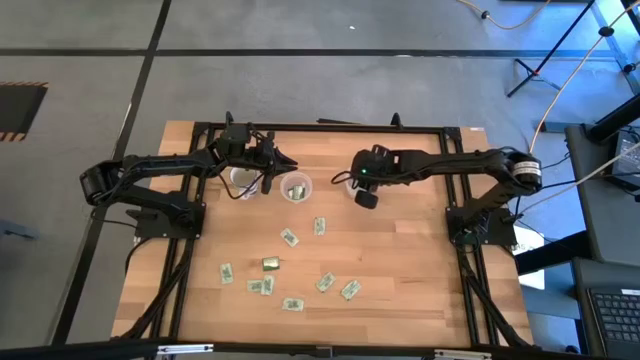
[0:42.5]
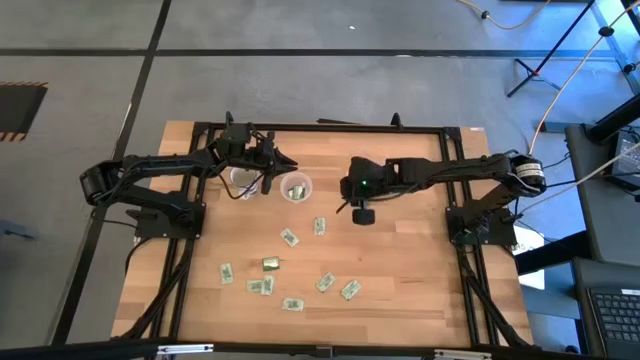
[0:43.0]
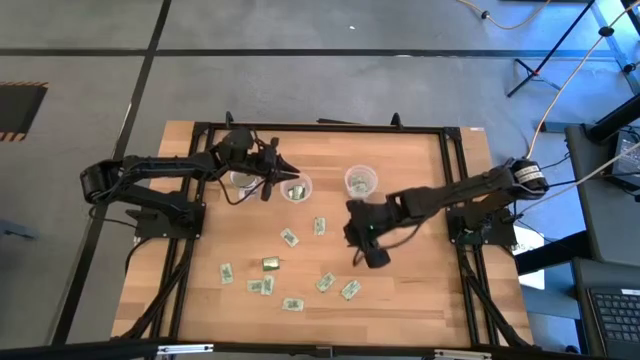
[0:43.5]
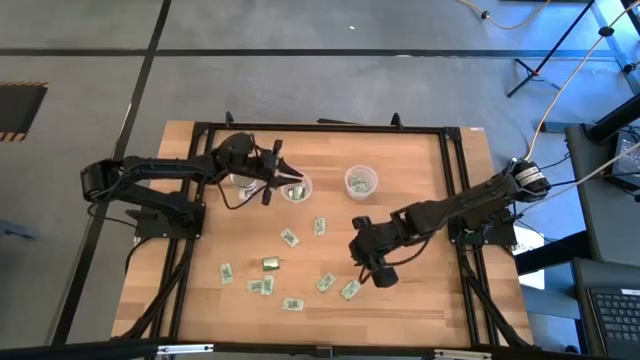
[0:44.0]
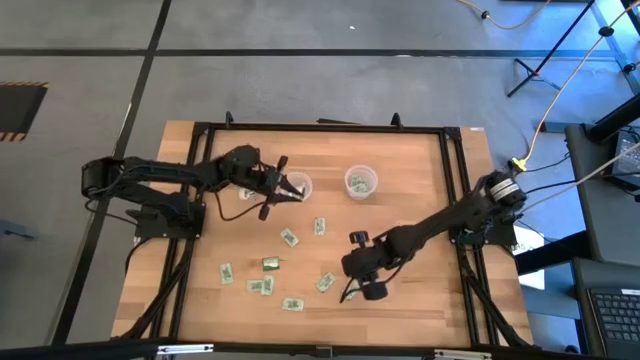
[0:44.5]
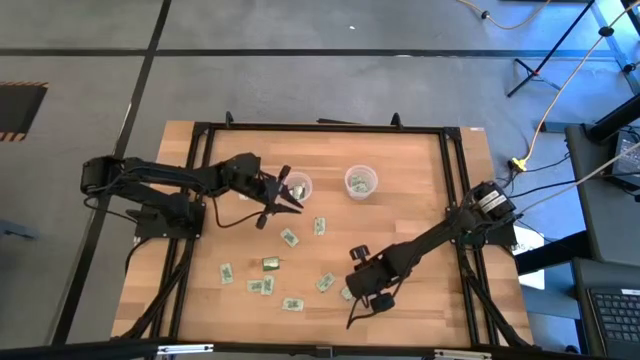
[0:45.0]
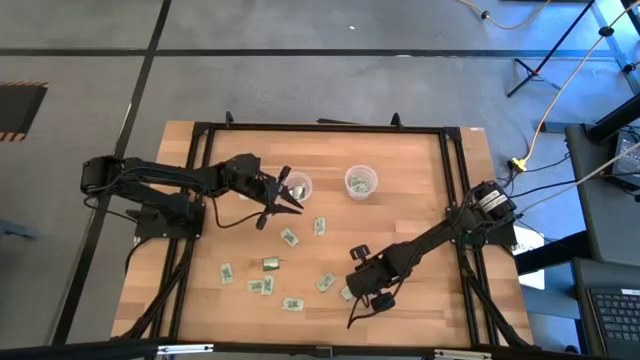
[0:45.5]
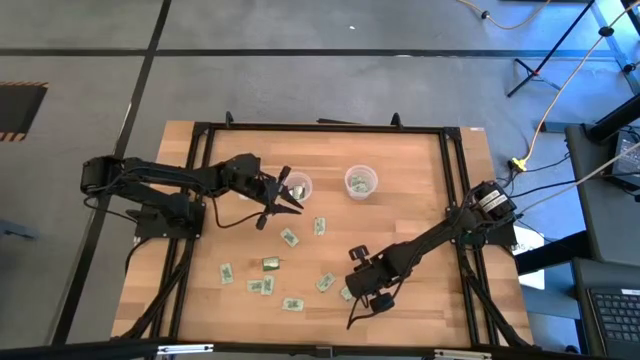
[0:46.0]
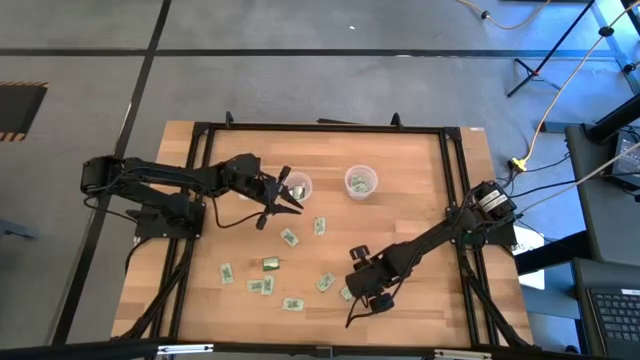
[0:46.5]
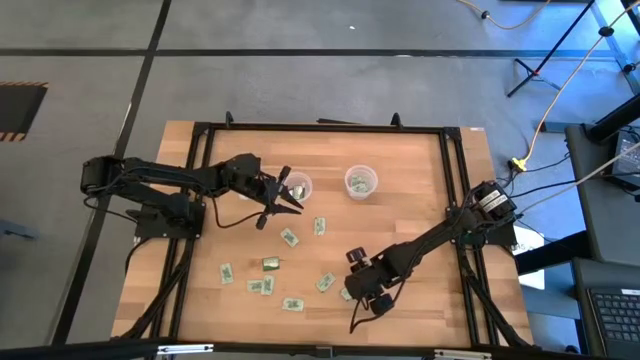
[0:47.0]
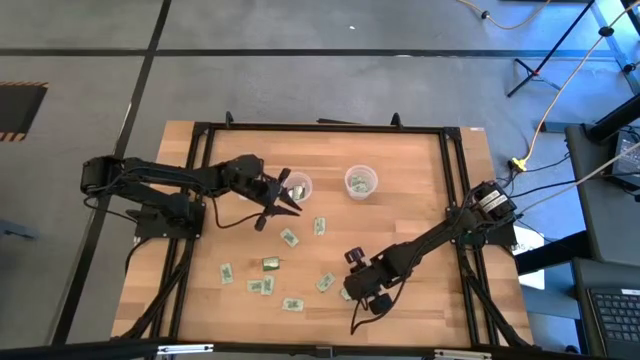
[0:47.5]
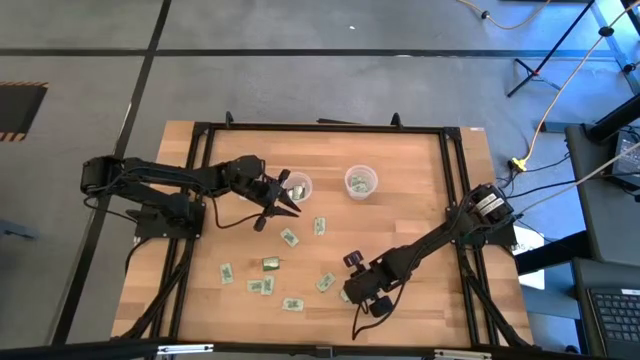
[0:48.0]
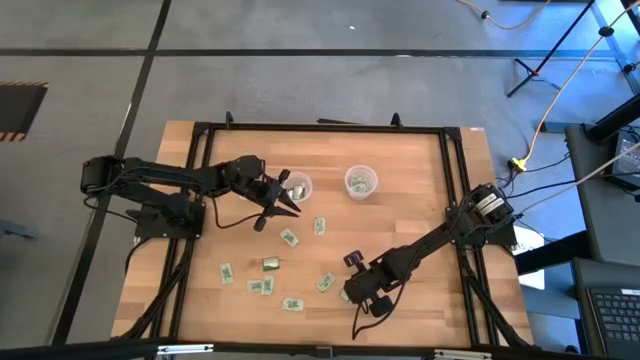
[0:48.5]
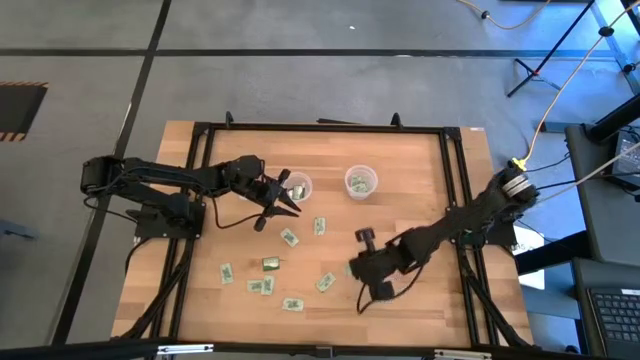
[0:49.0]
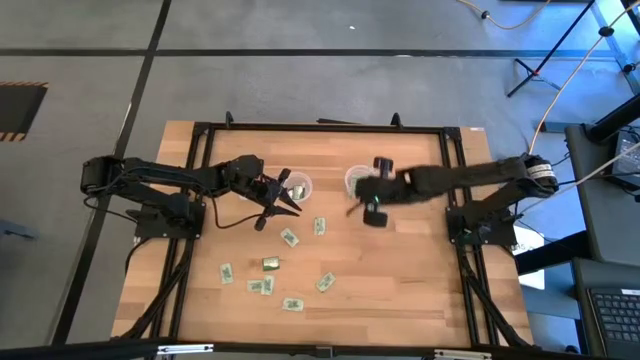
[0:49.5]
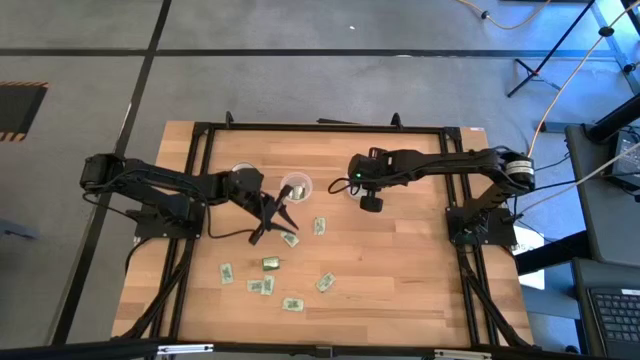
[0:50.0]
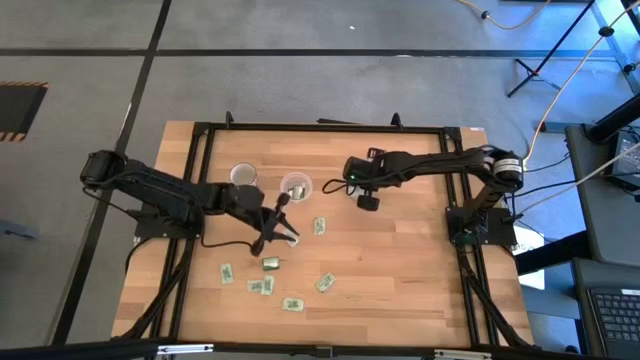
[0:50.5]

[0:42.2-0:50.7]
Task: Pick and place items into bin
Put the white stevia packet into the right transparent bin

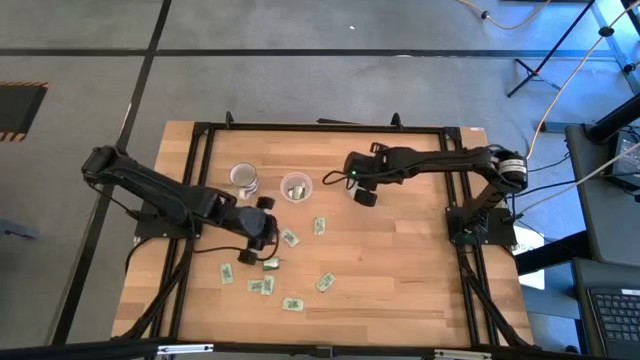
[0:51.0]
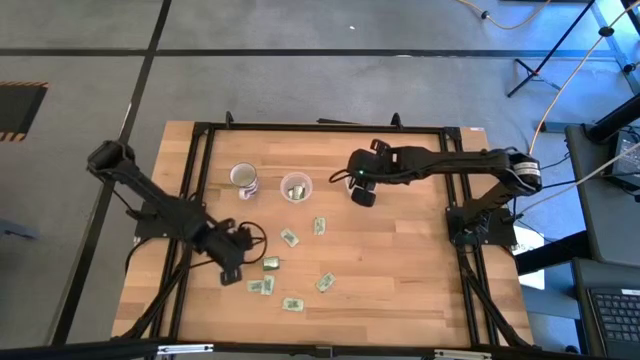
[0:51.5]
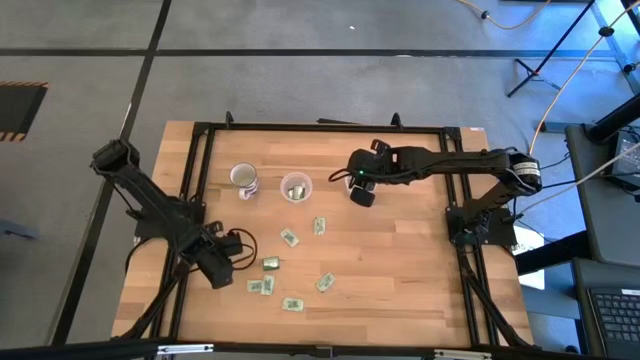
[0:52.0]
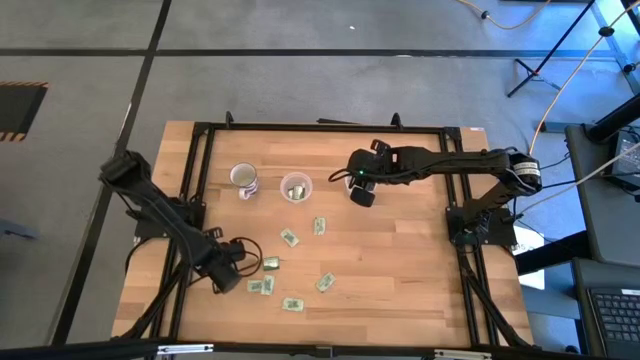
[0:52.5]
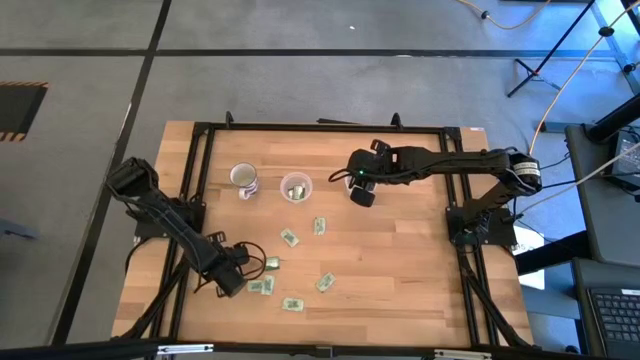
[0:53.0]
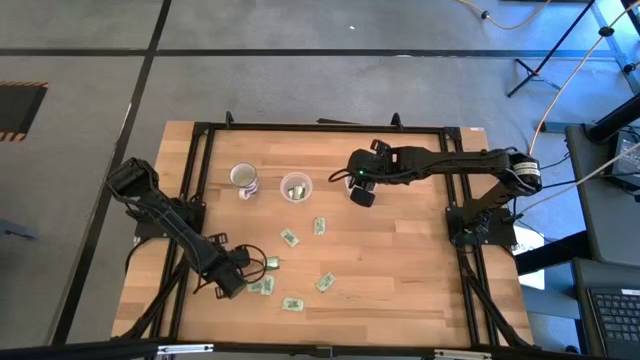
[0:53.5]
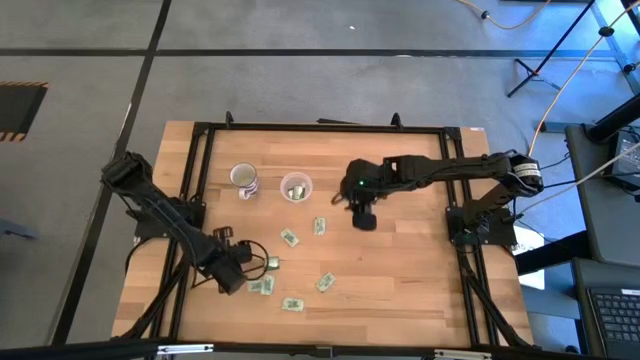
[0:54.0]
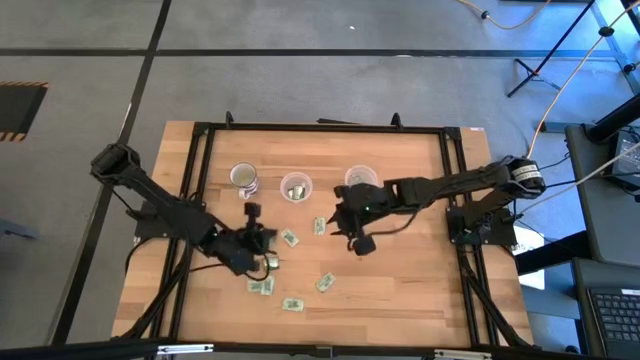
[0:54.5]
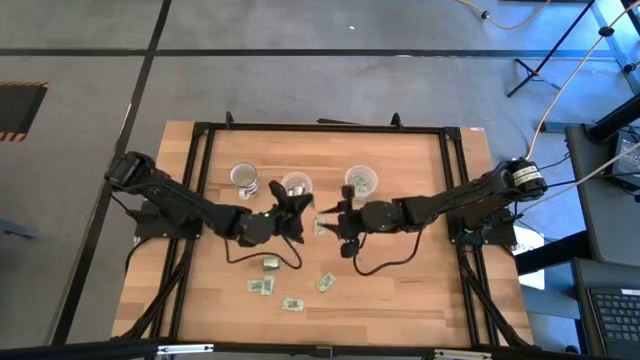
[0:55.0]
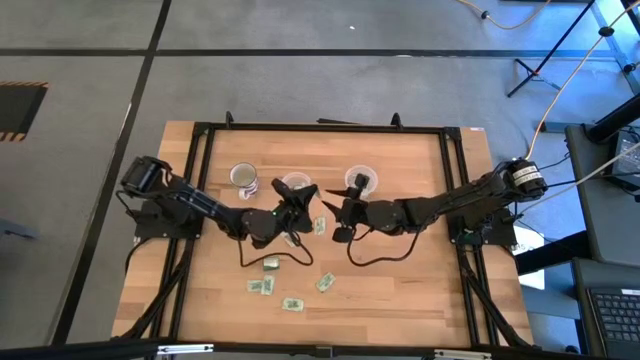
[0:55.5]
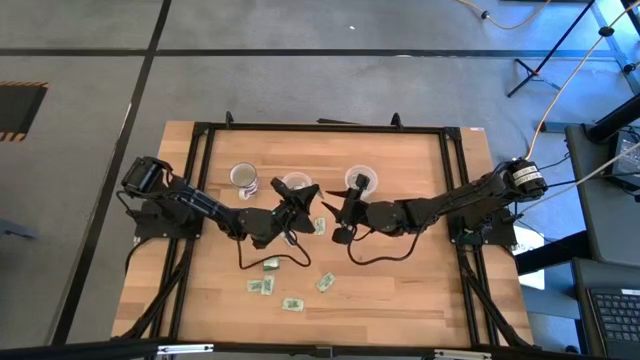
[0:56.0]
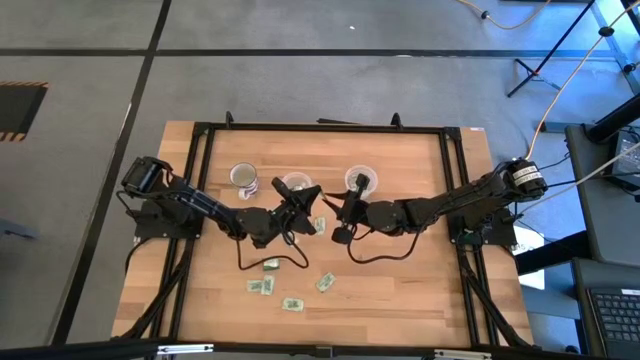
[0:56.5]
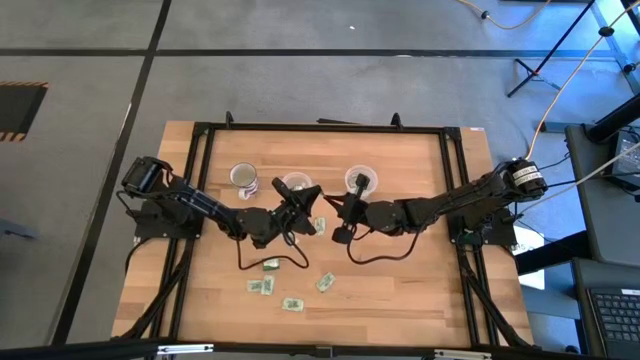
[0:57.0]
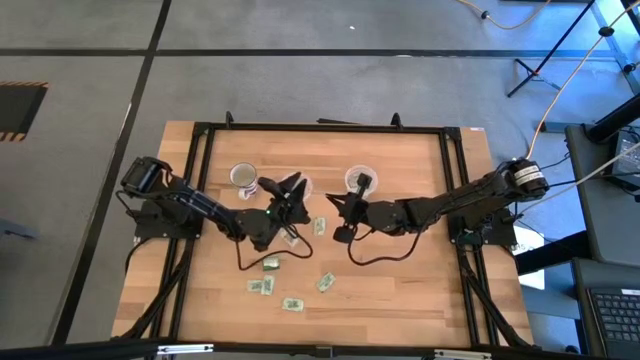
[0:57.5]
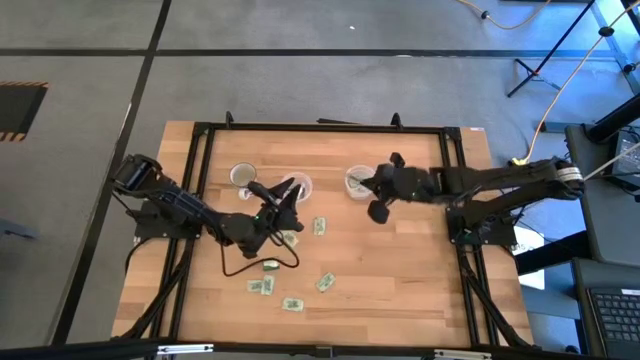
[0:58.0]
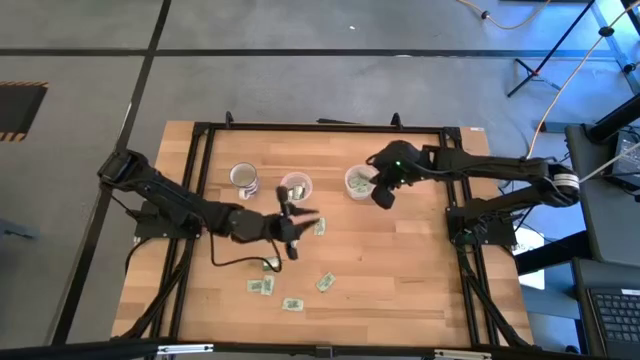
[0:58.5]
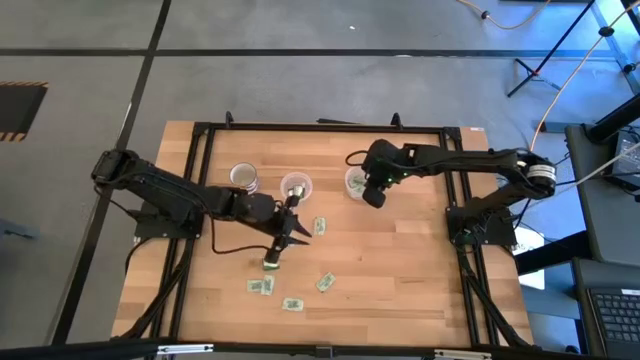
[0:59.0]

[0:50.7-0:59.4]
Put the white stevia packet into the right transparent bin

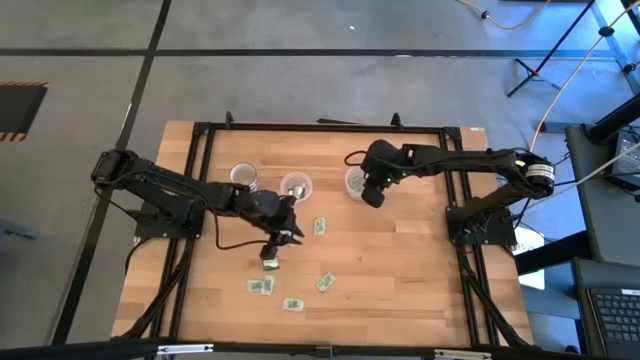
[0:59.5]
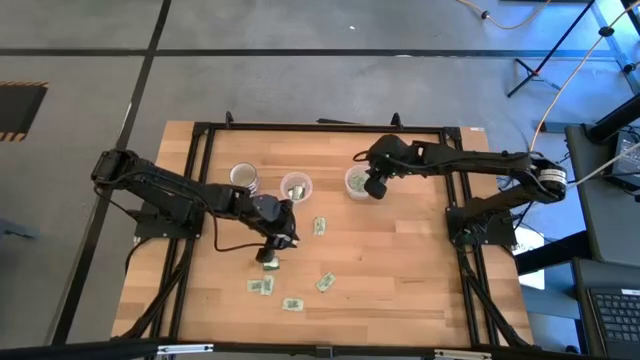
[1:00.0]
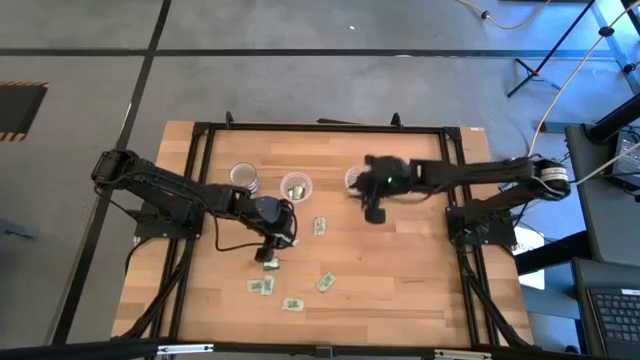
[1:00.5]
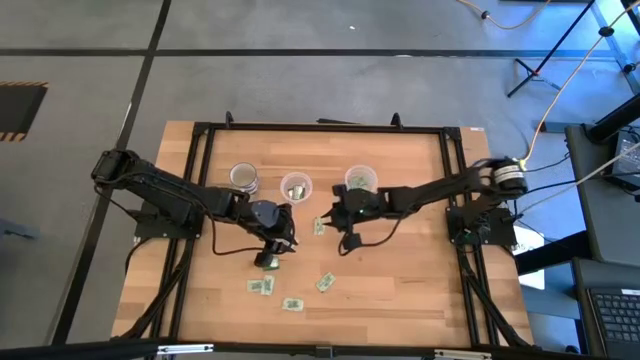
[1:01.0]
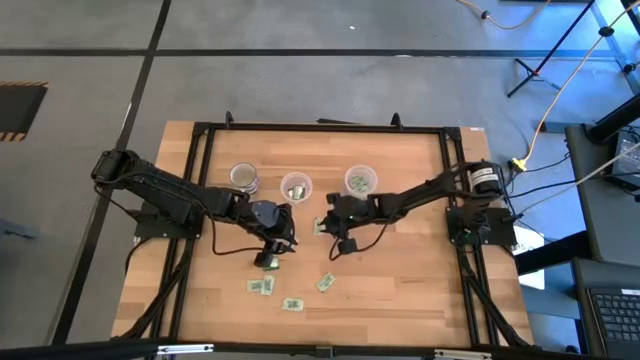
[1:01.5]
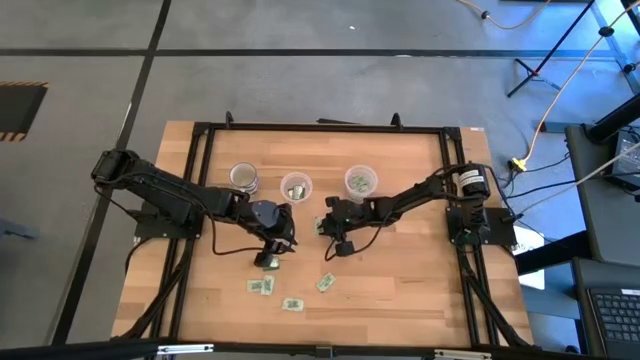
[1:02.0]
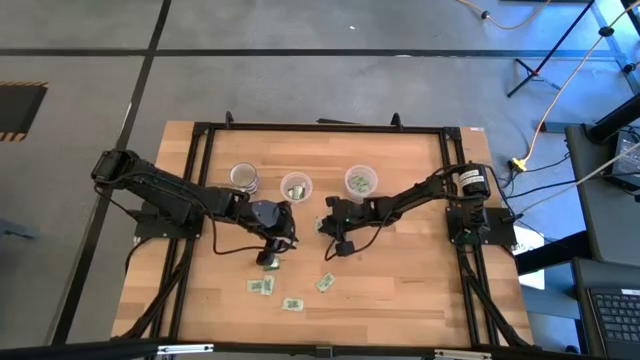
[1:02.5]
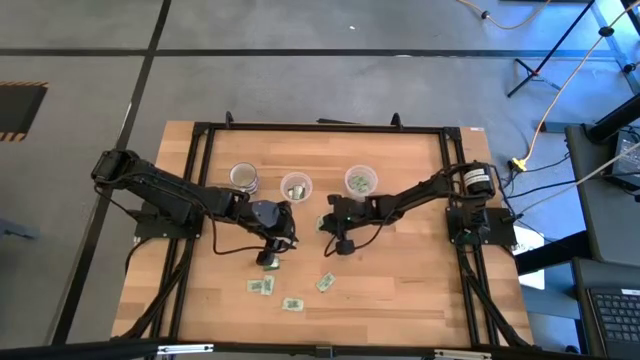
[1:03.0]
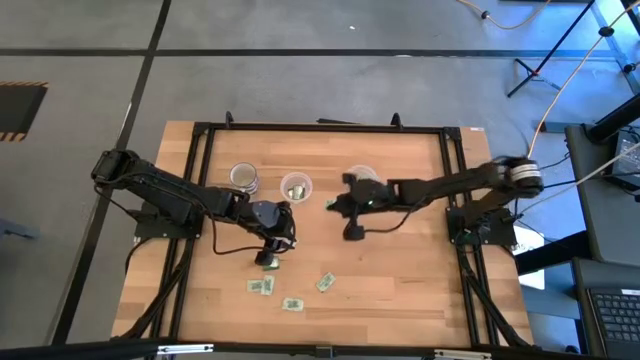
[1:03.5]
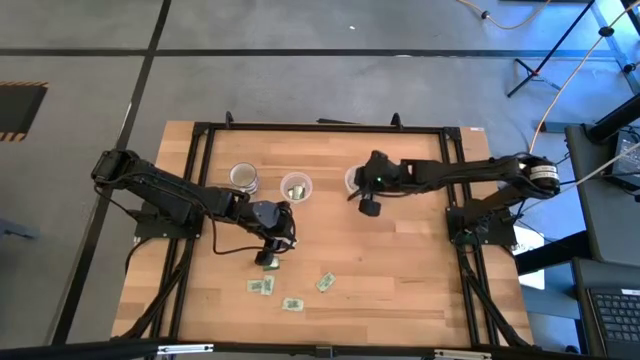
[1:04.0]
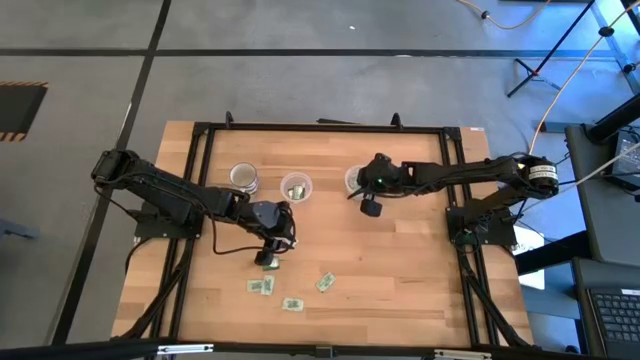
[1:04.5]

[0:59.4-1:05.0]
Put the white stevia packet into the right transparent bin
